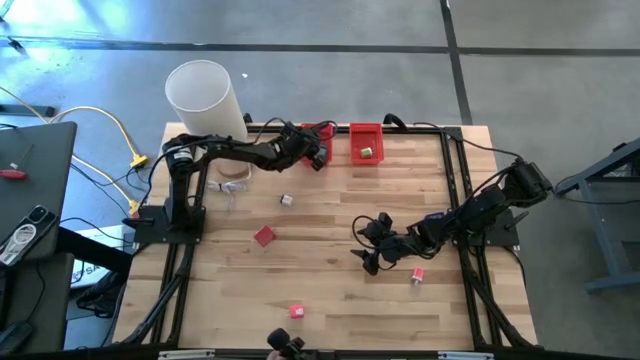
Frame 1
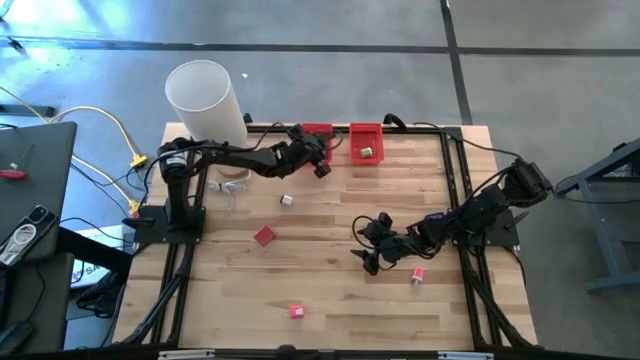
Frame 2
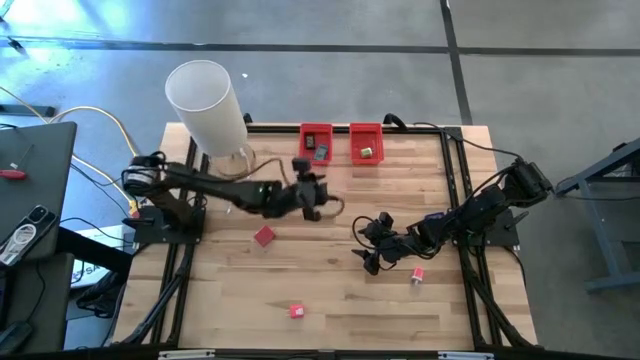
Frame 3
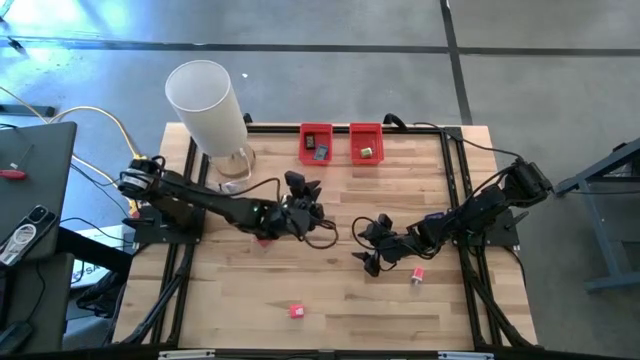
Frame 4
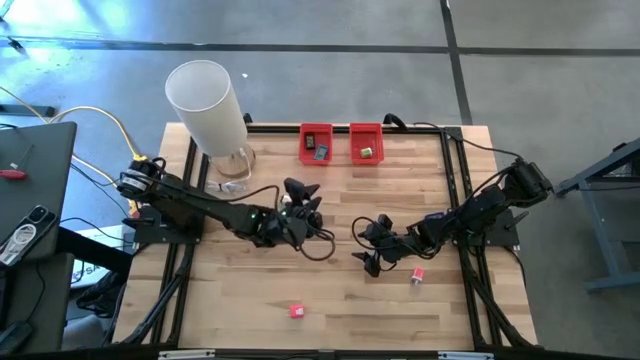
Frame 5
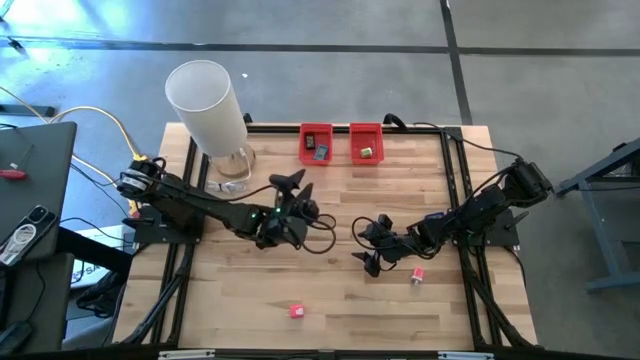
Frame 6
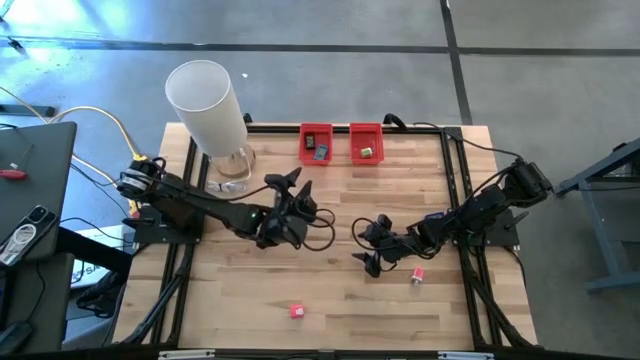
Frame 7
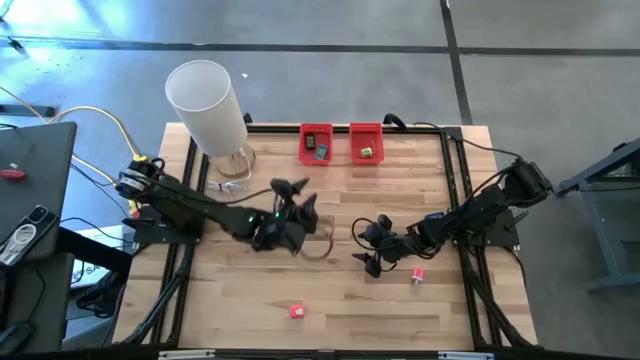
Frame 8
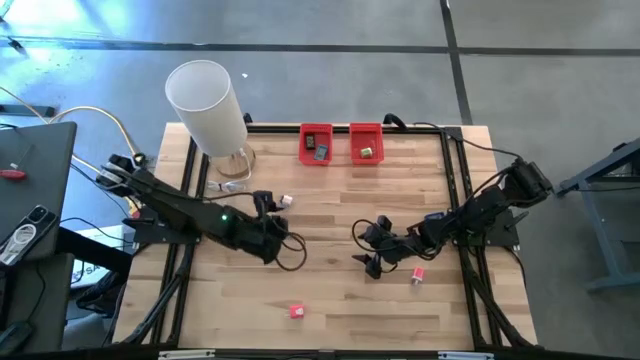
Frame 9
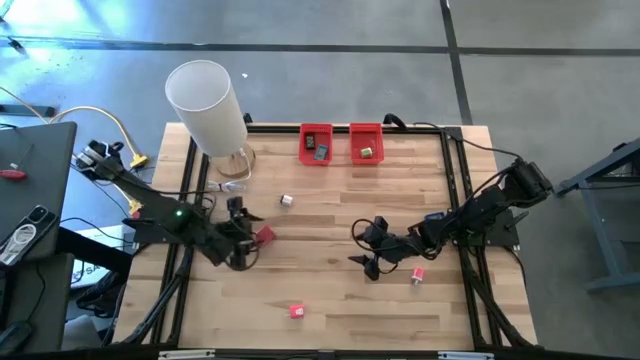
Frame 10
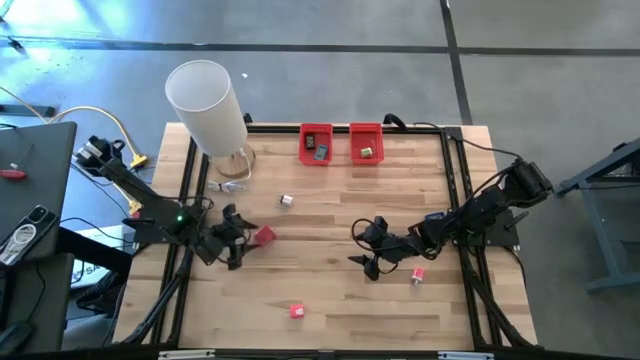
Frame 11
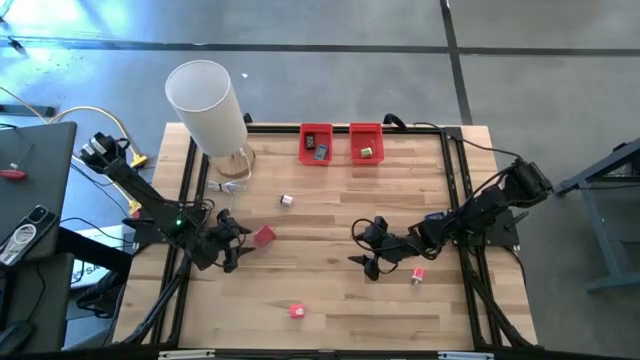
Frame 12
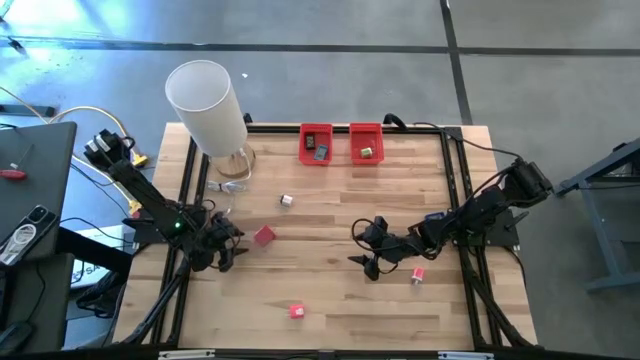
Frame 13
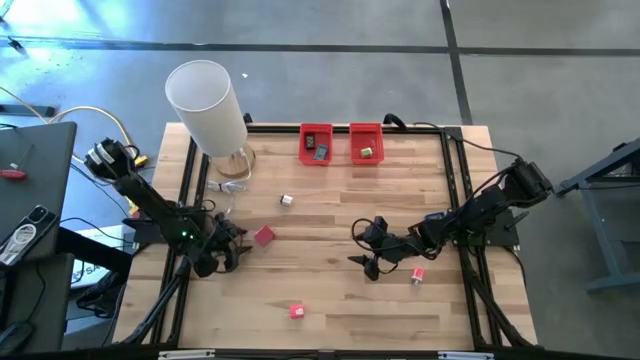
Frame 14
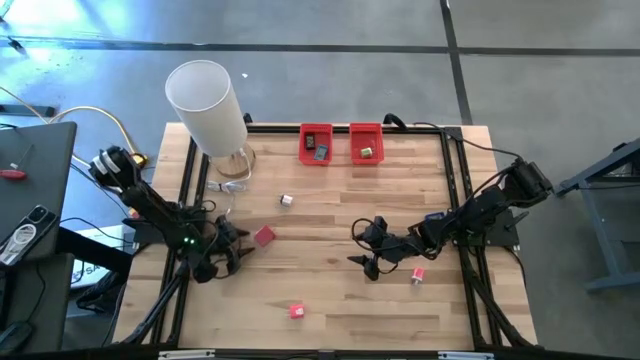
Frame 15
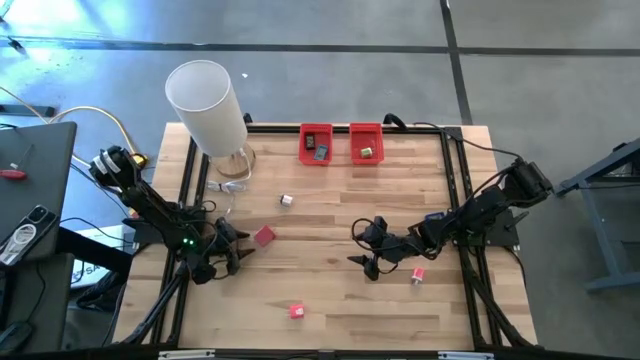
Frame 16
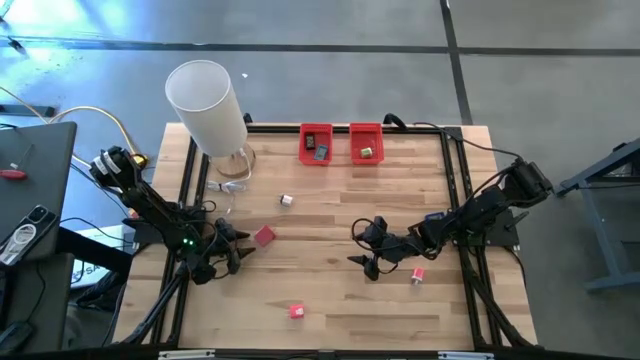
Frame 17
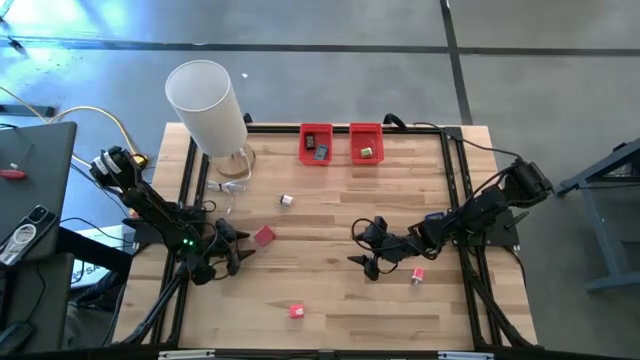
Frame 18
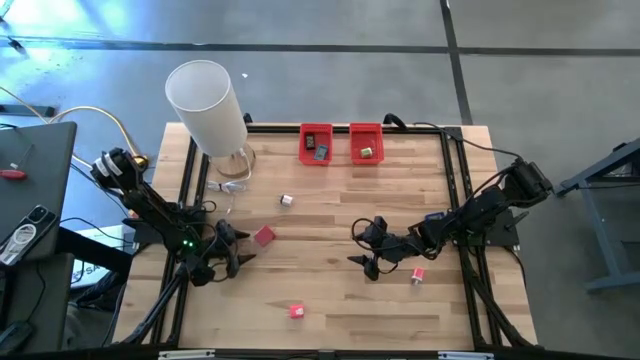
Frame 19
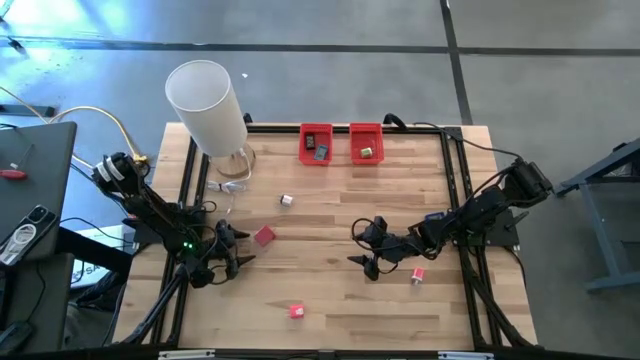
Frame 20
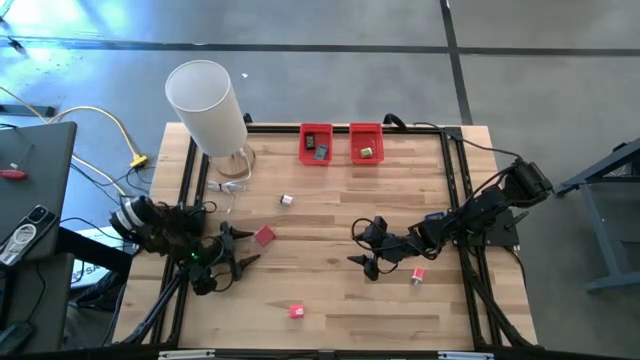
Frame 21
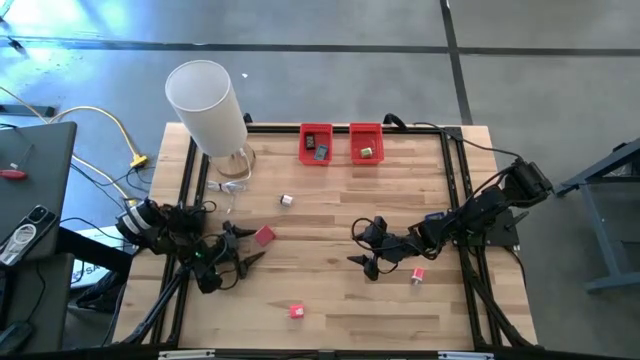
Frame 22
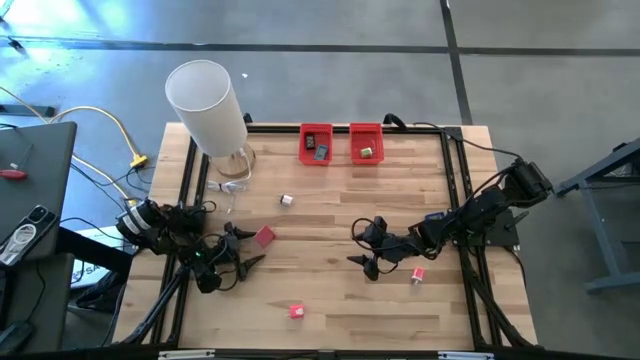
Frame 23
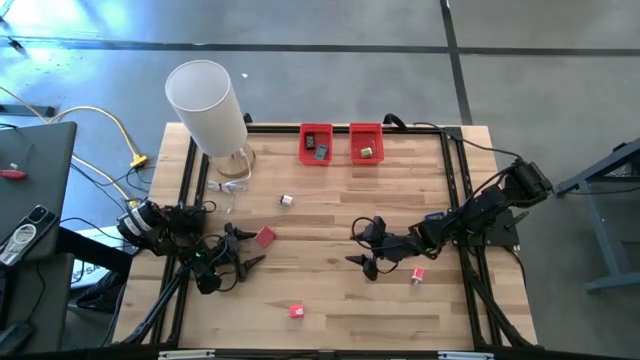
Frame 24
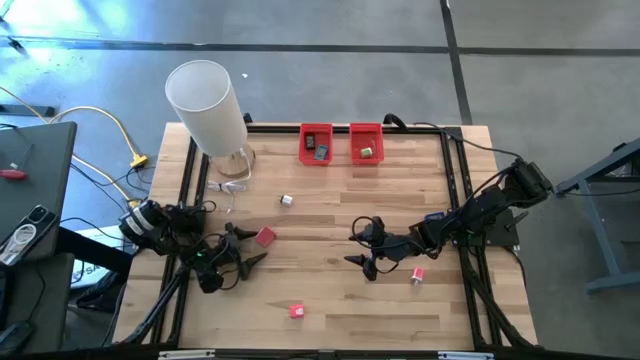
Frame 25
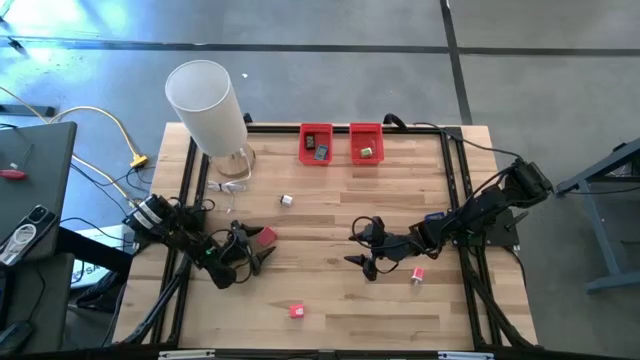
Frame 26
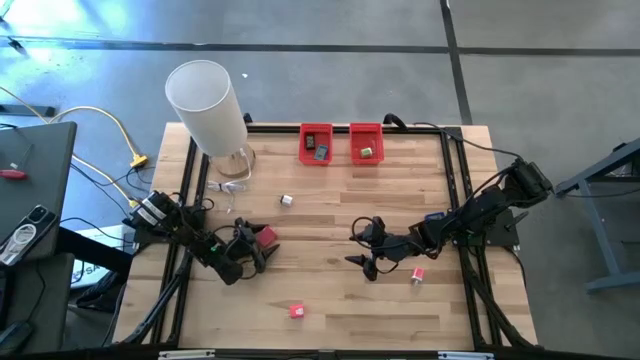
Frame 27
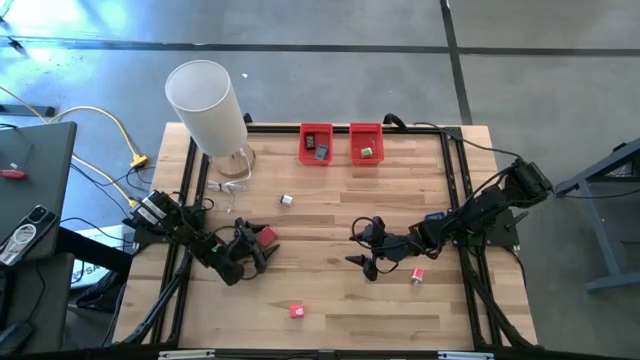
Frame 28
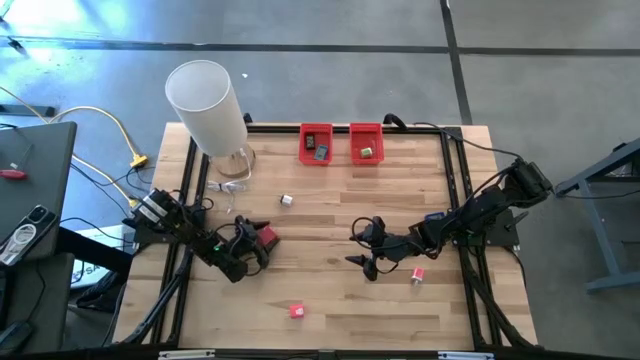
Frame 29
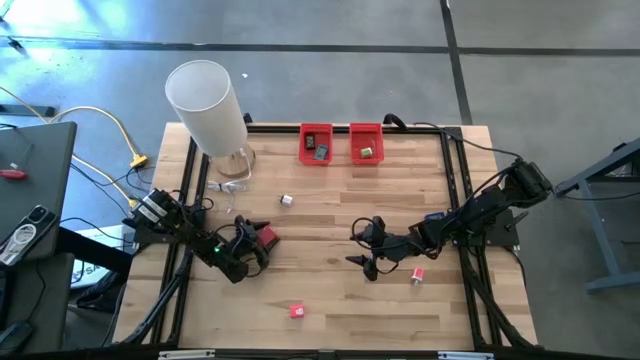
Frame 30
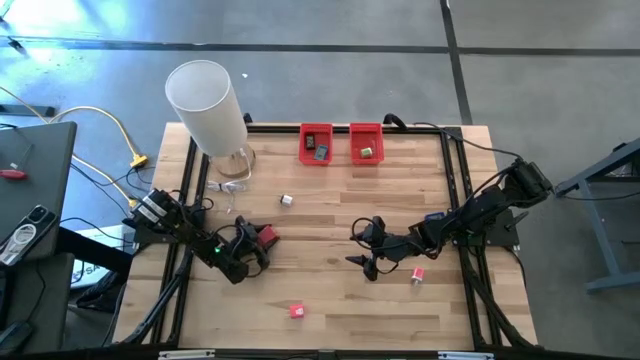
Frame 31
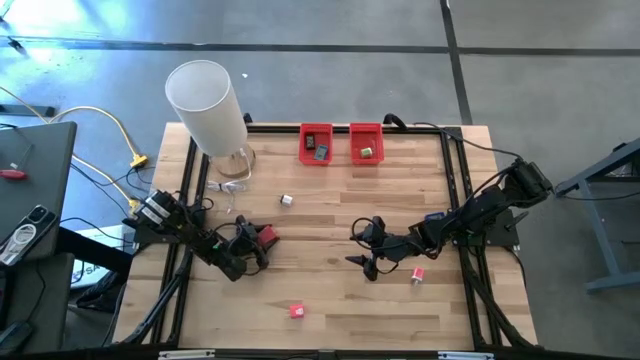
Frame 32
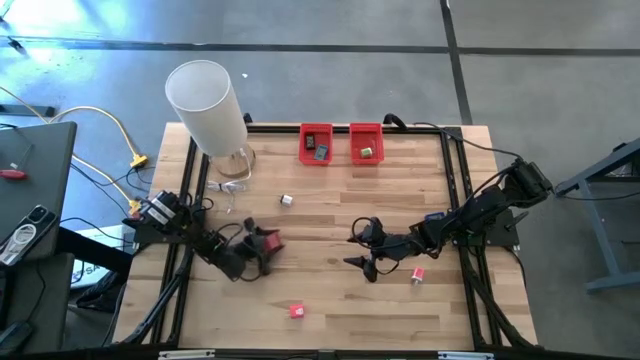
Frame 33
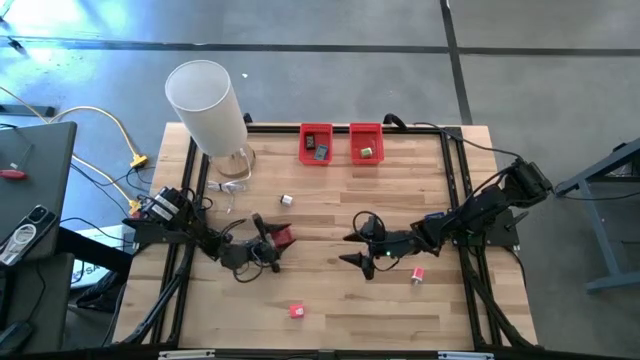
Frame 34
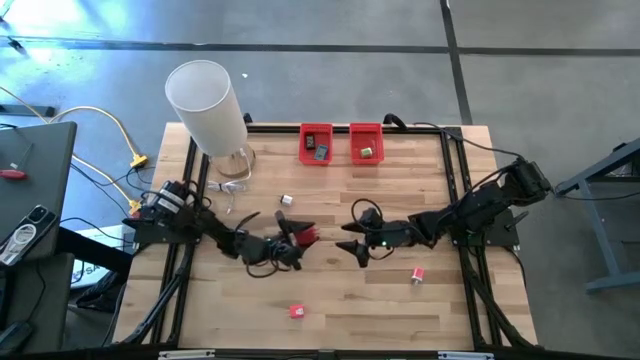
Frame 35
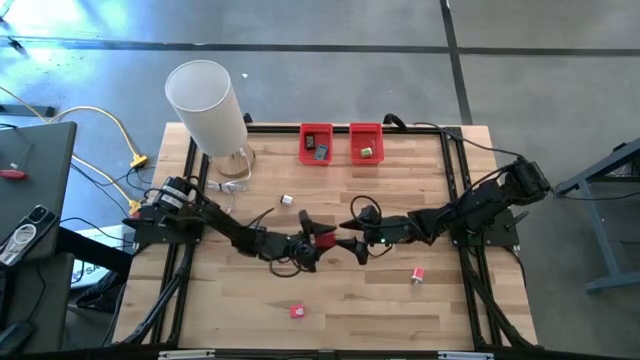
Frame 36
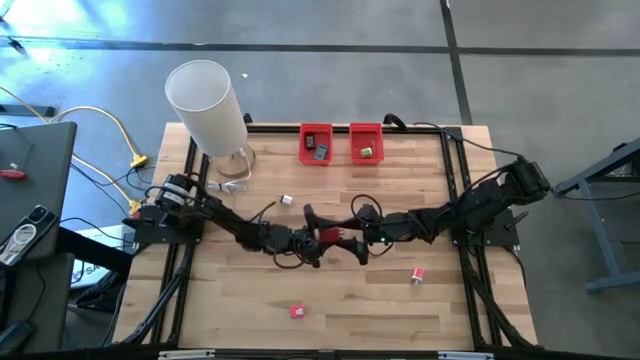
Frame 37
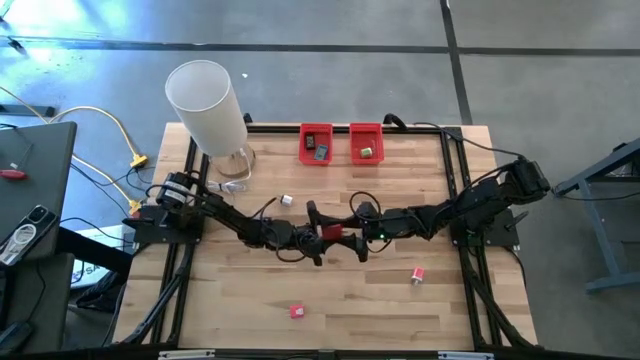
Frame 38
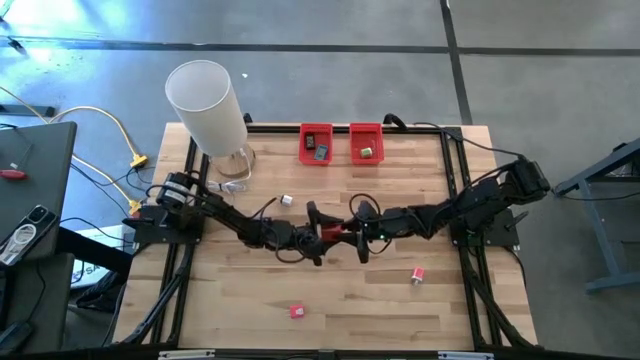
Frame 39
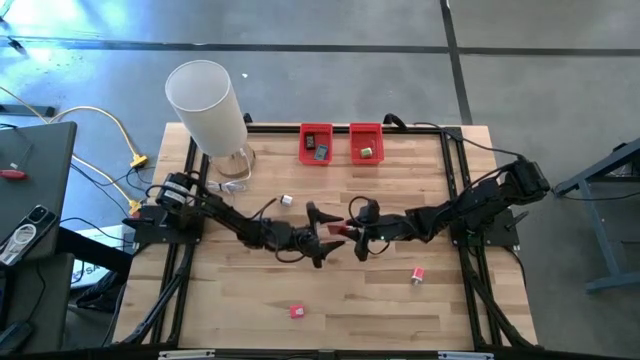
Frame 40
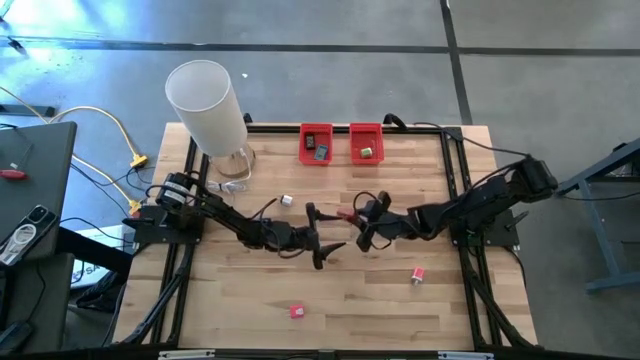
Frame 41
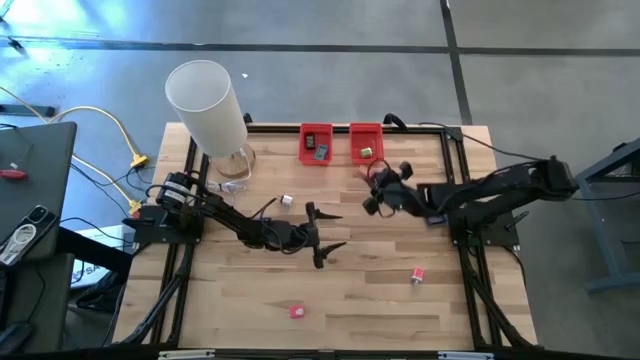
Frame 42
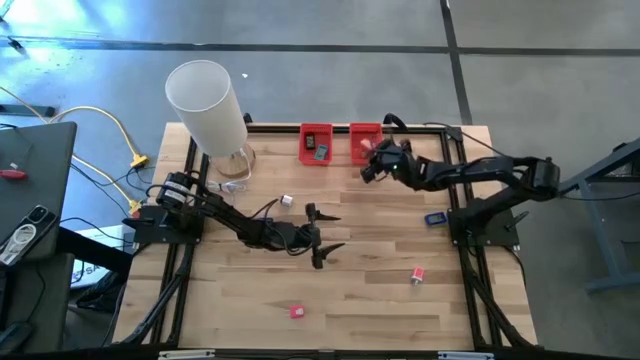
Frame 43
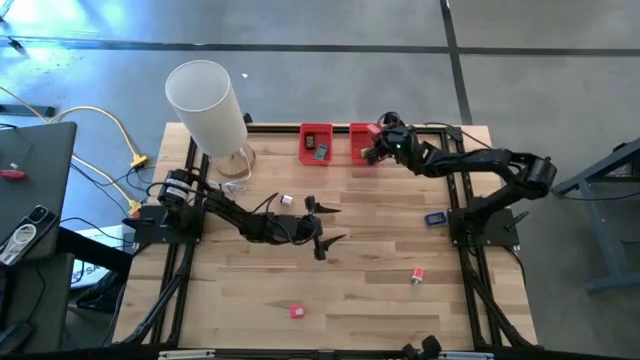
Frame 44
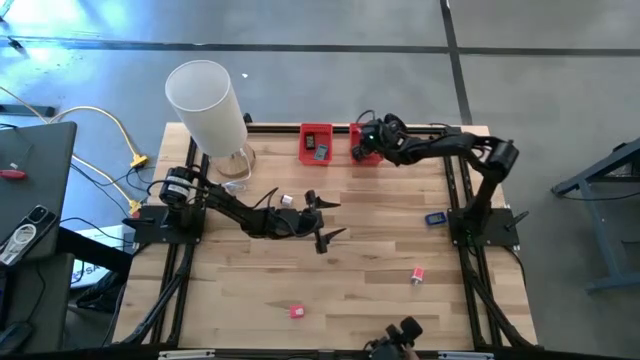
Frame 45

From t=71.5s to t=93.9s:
Task: Pick & Place Office items
Put the red charger adapter into the right red bin
